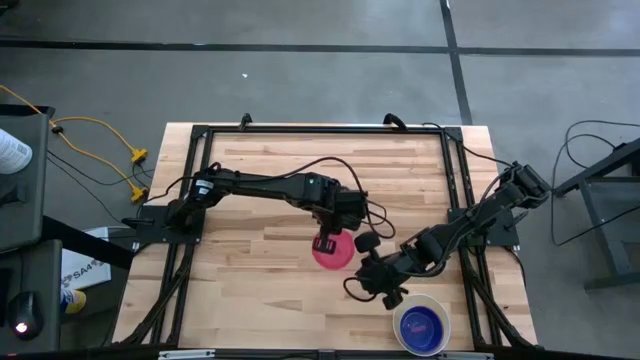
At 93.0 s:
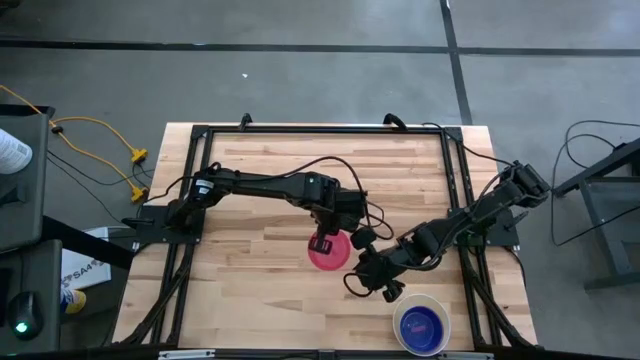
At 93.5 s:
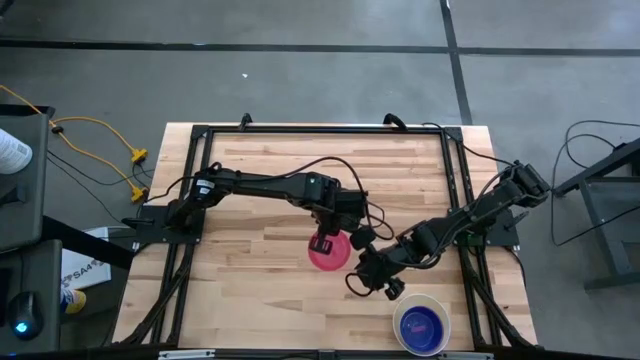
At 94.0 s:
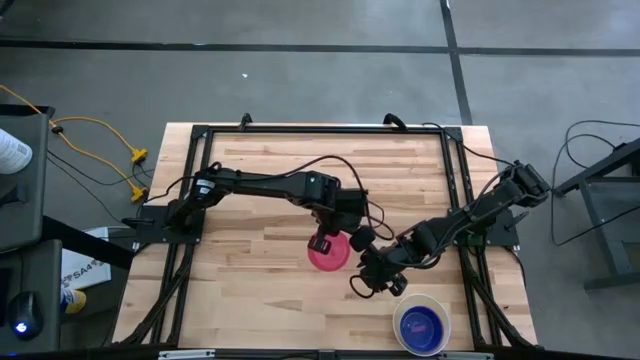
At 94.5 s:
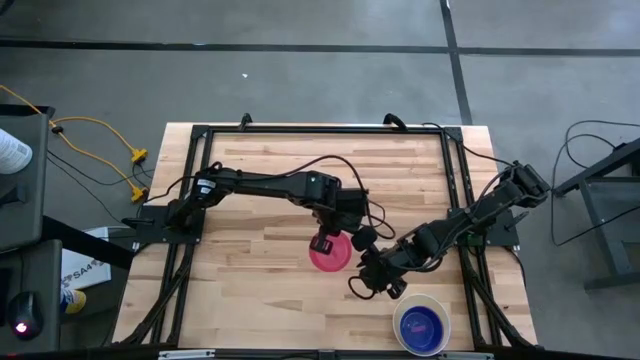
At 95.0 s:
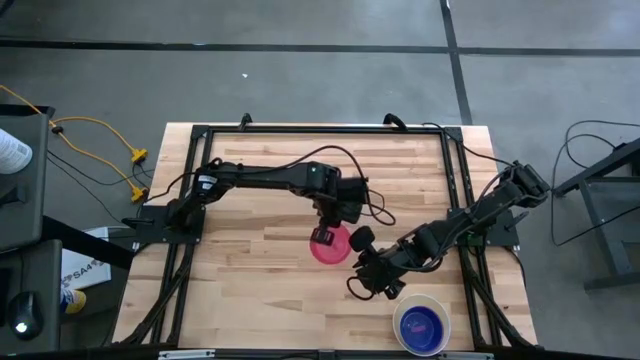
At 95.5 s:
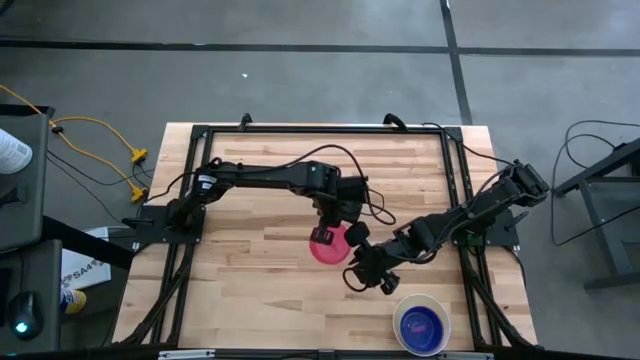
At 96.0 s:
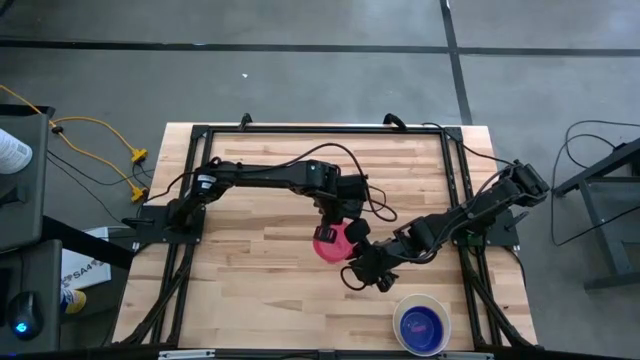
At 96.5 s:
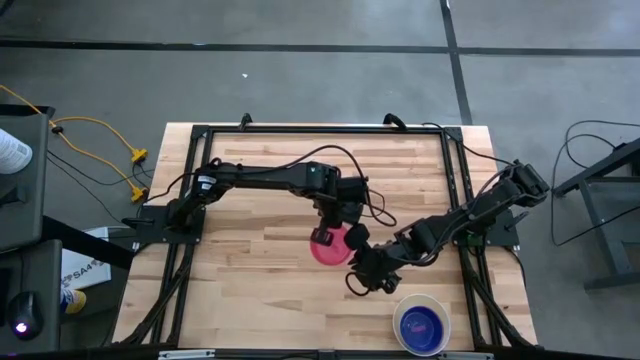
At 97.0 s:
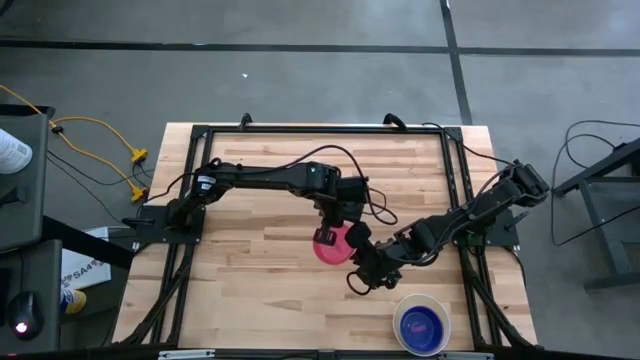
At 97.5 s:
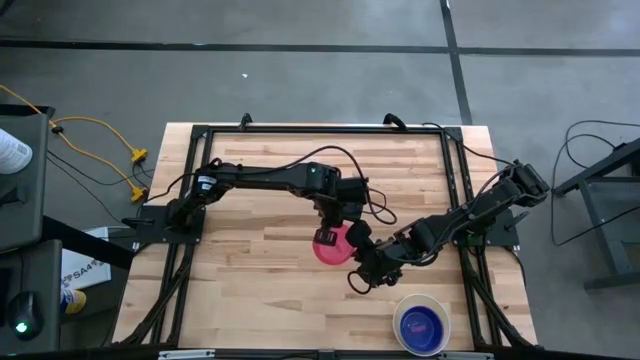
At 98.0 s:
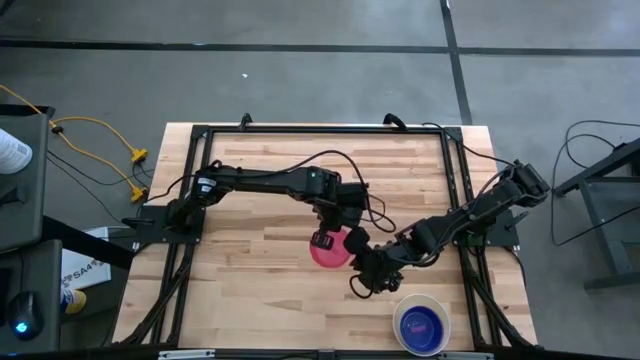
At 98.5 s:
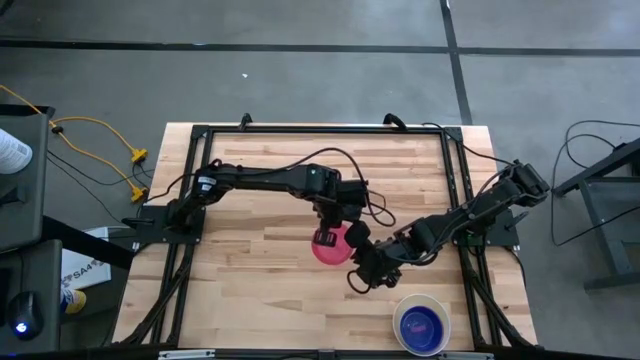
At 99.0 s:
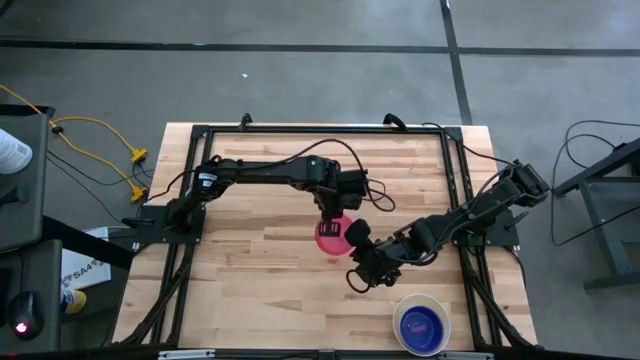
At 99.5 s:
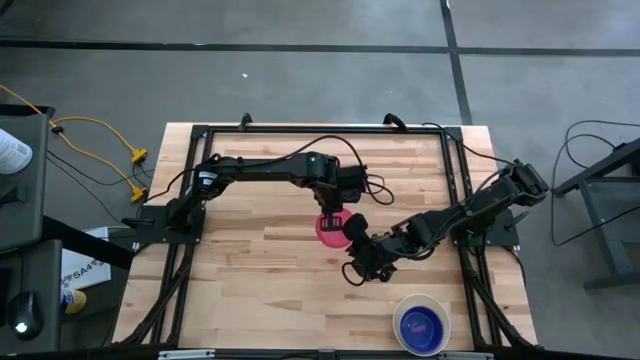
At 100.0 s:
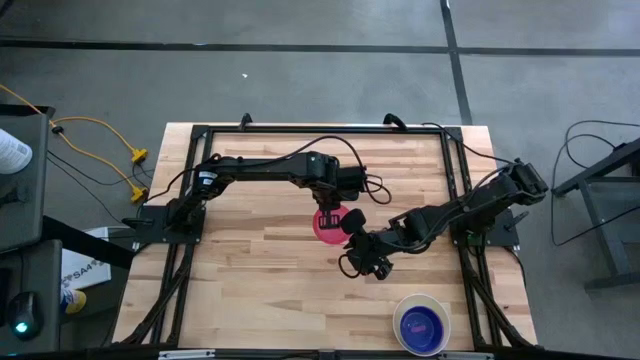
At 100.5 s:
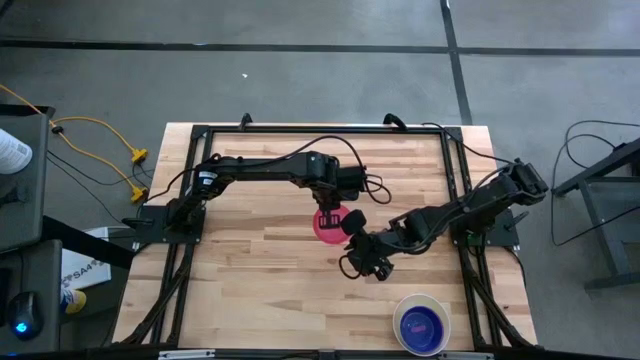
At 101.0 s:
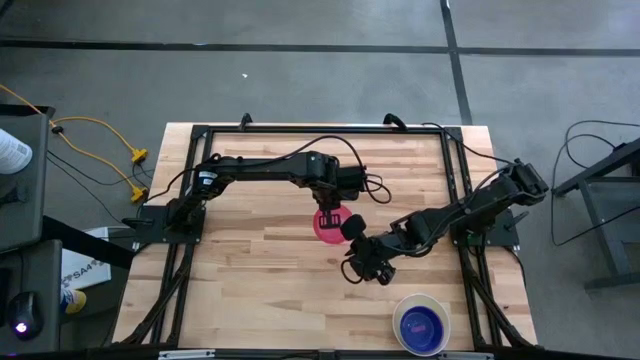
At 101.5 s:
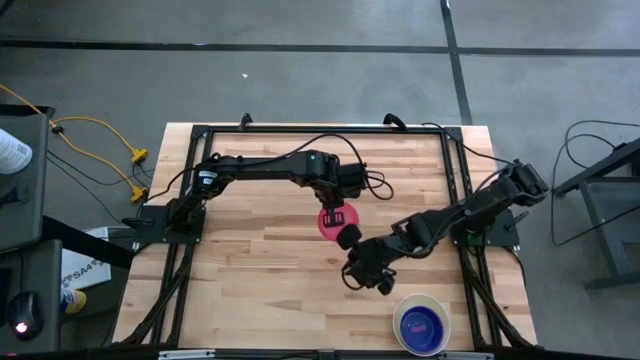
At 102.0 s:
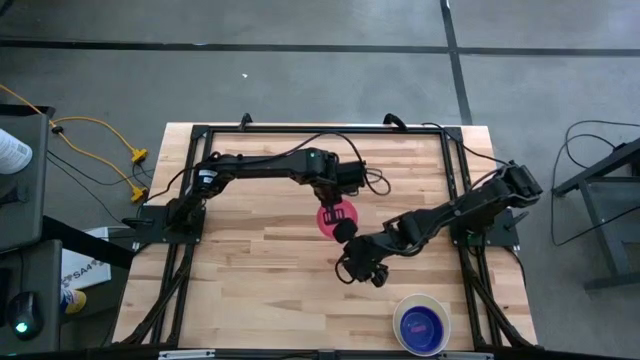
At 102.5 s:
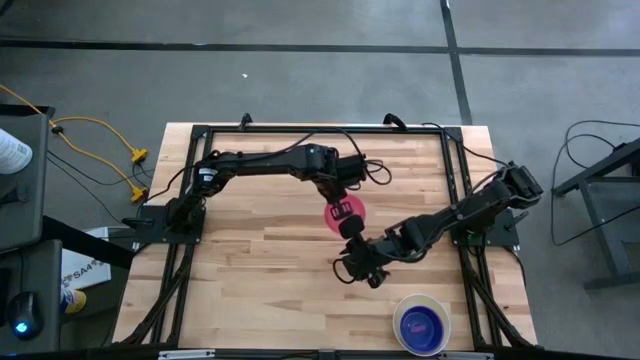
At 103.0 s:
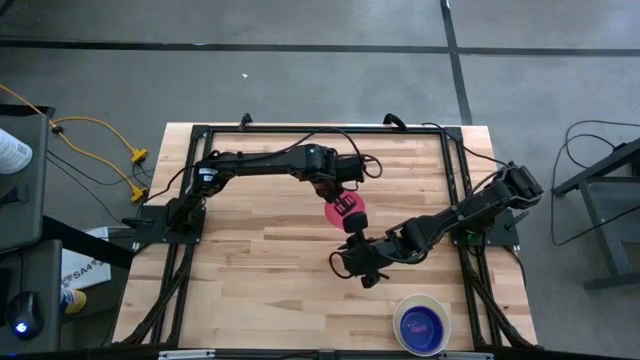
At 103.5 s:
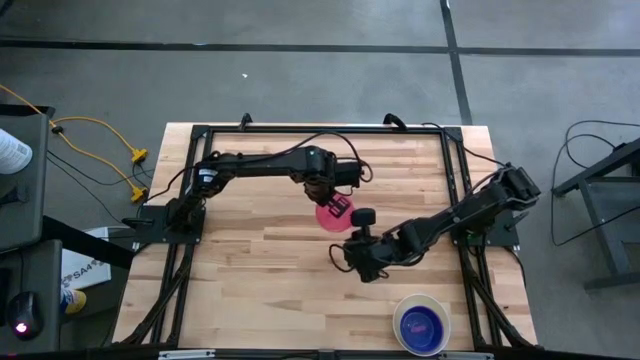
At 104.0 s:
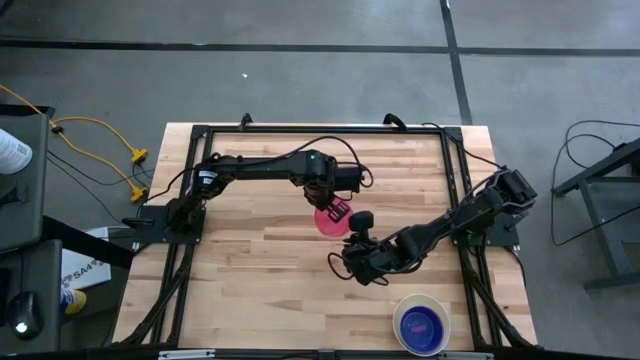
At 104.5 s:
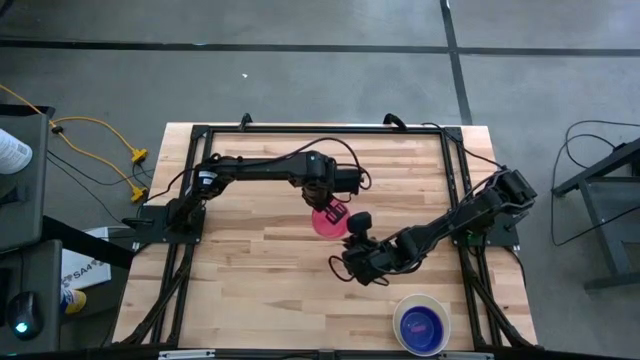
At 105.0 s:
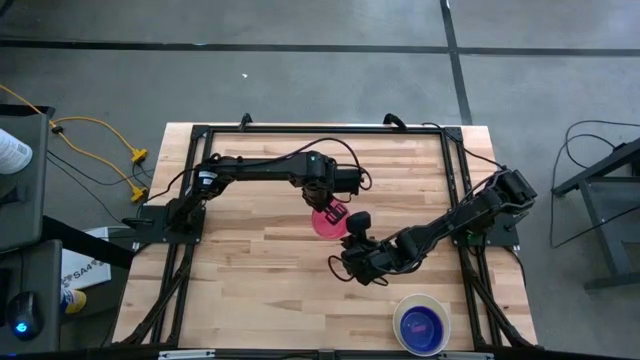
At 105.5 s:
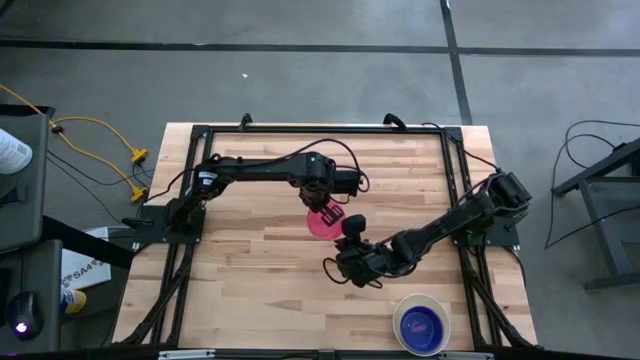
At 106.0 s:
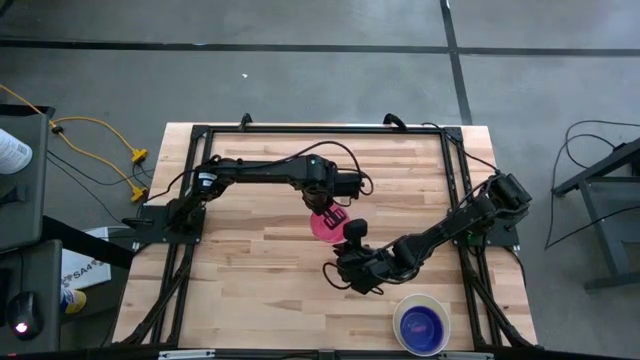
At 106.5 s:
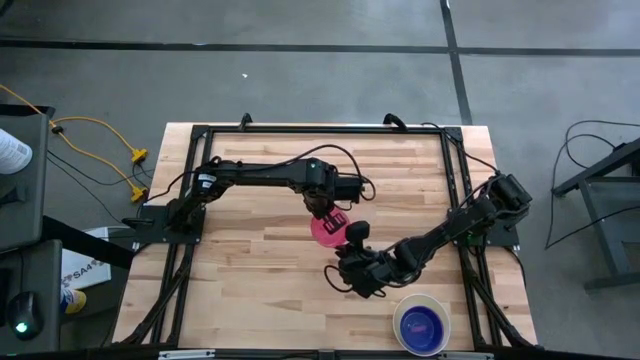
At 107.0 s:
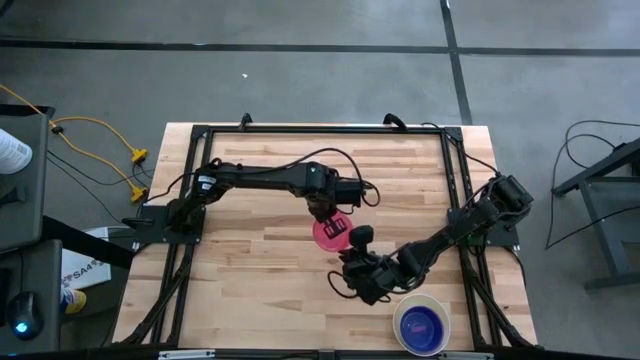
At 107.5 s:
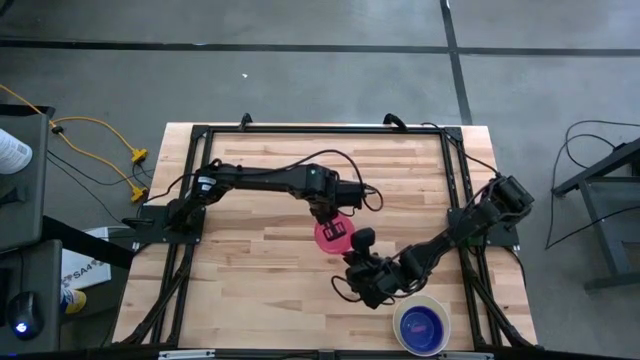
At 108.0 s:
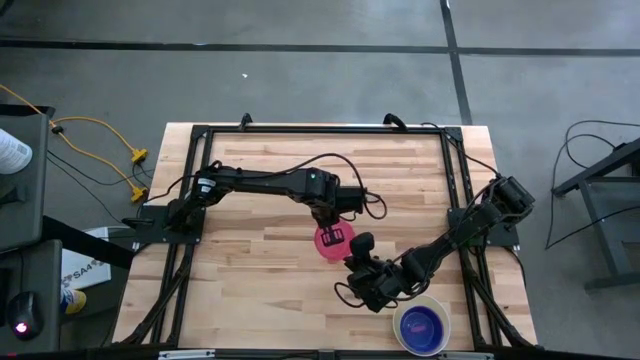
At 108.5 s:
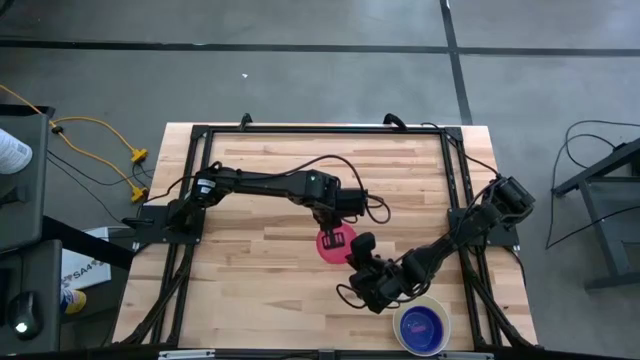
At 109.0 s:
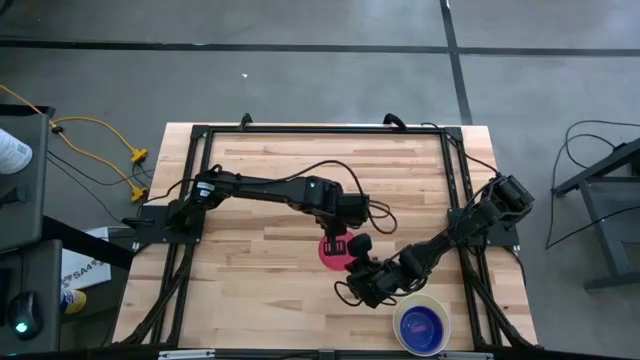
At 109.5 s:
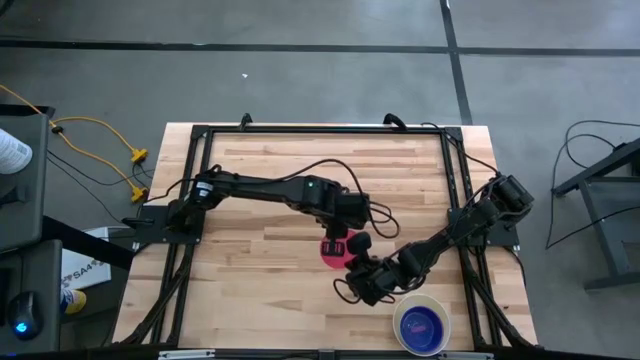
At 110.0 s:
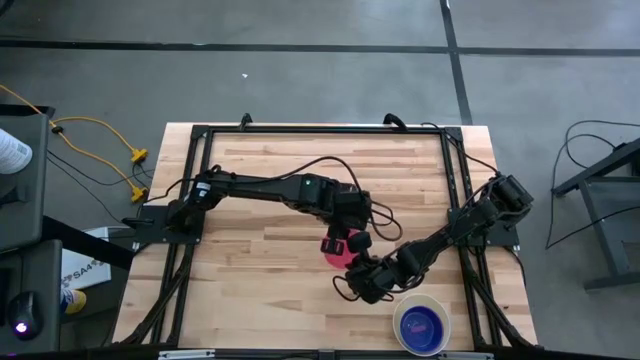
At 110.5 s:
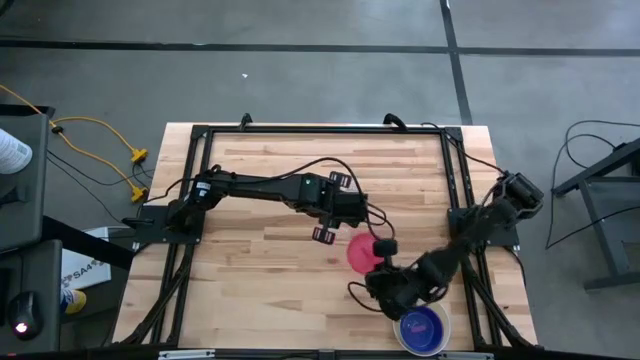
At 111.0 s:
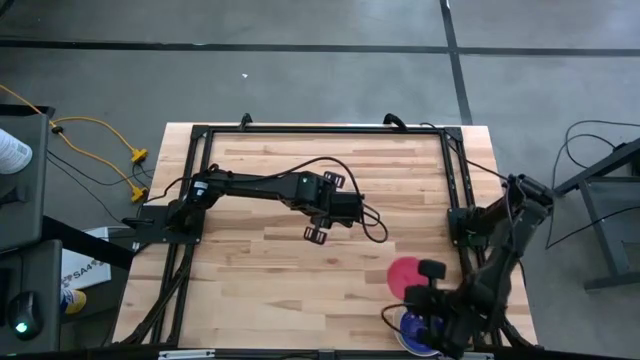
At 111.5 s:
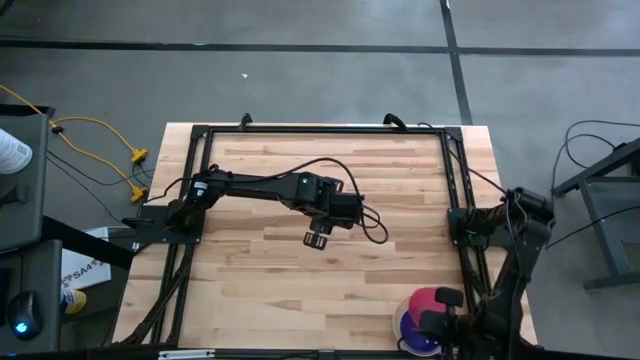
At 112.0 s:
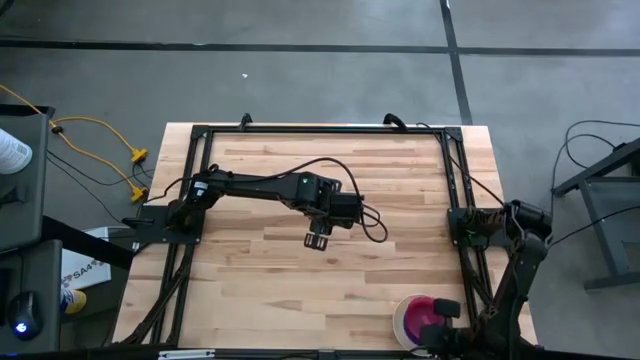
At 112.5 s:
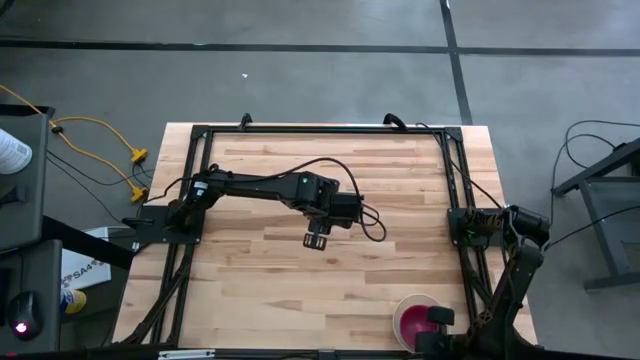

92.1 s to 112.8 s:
Stack the red bowl on the purple bowl
